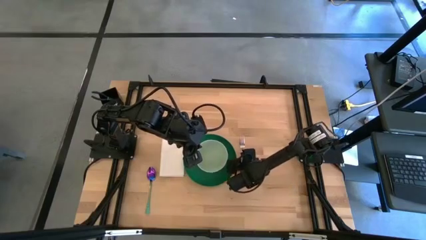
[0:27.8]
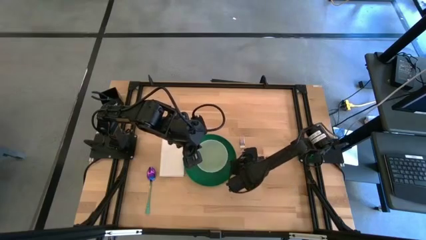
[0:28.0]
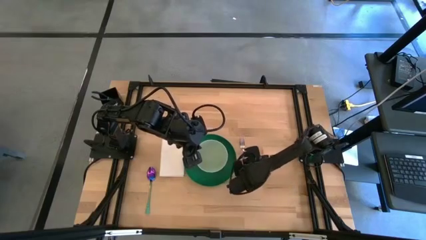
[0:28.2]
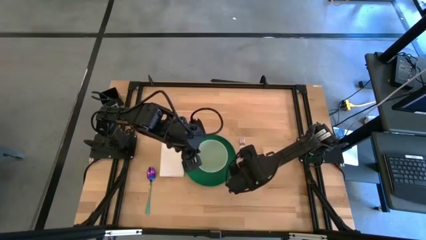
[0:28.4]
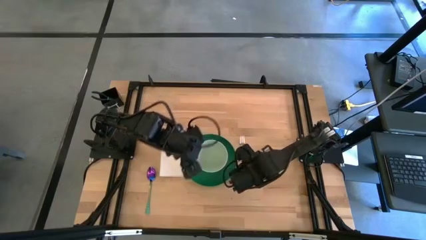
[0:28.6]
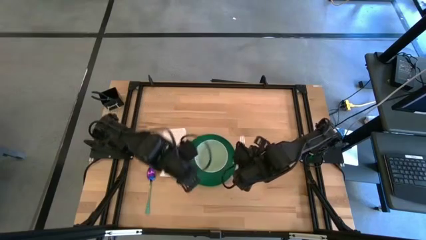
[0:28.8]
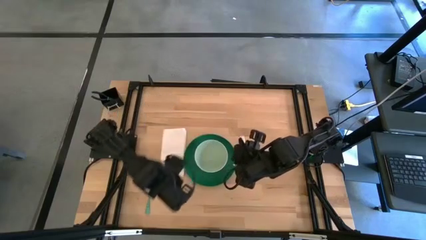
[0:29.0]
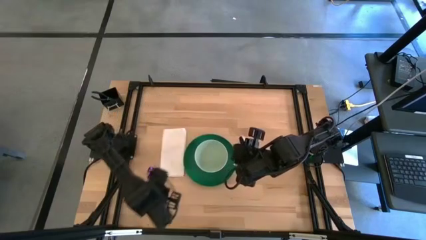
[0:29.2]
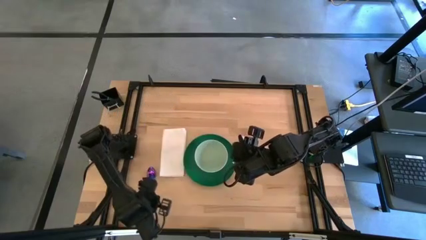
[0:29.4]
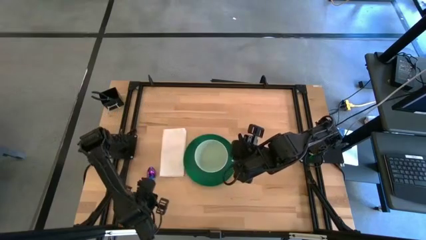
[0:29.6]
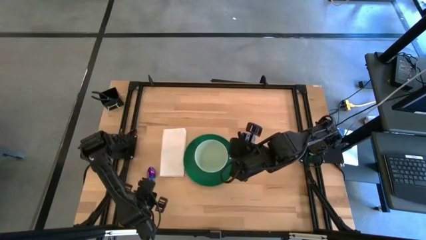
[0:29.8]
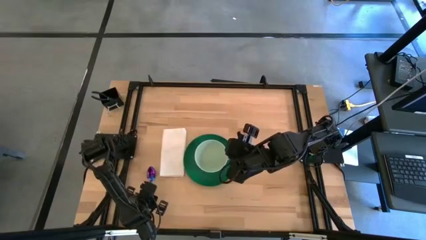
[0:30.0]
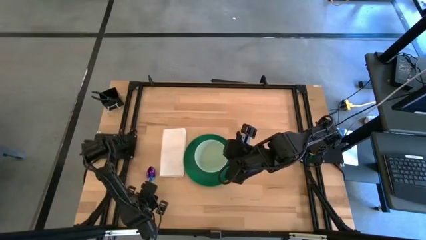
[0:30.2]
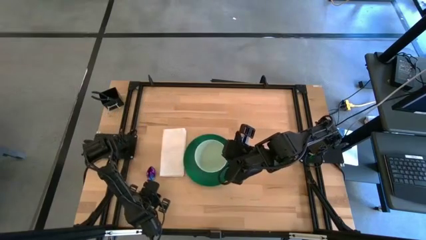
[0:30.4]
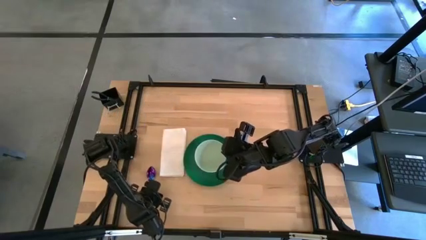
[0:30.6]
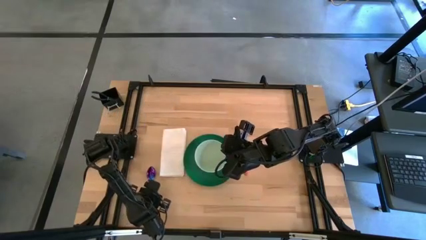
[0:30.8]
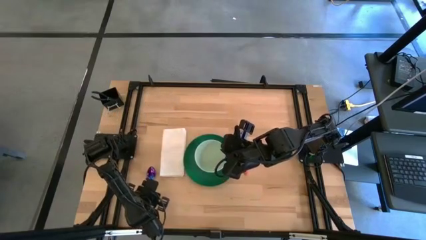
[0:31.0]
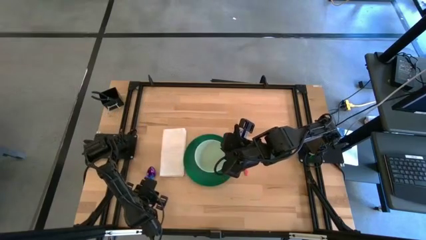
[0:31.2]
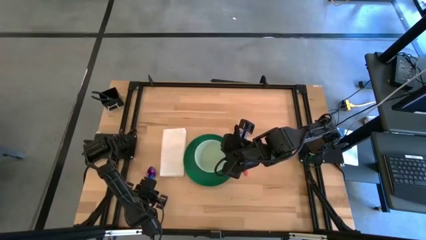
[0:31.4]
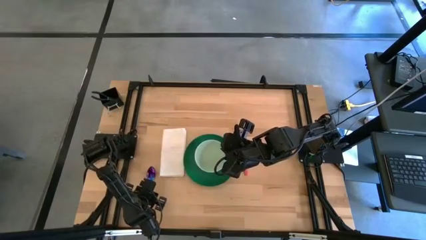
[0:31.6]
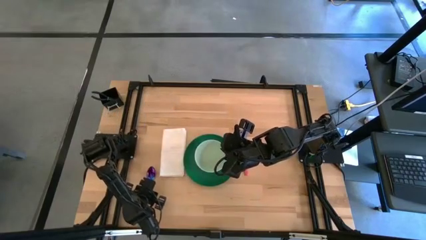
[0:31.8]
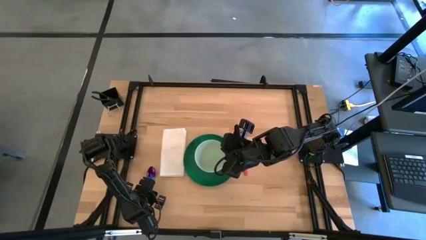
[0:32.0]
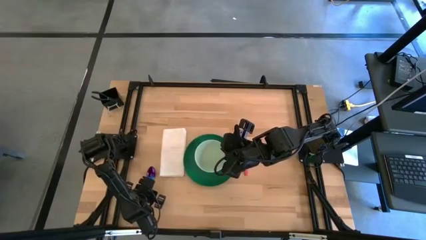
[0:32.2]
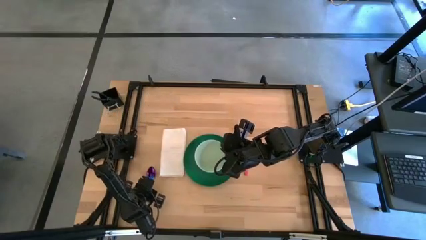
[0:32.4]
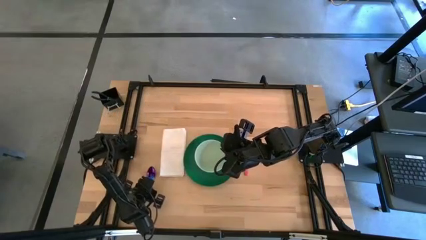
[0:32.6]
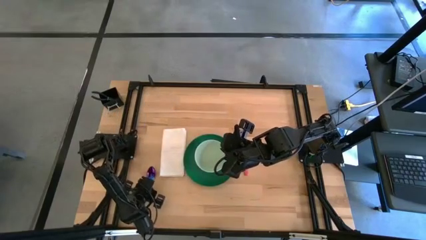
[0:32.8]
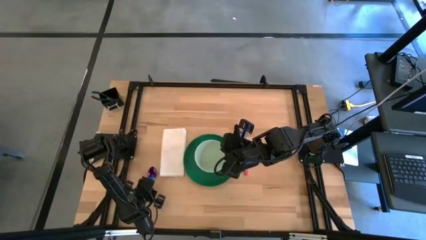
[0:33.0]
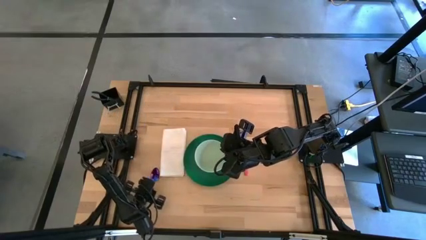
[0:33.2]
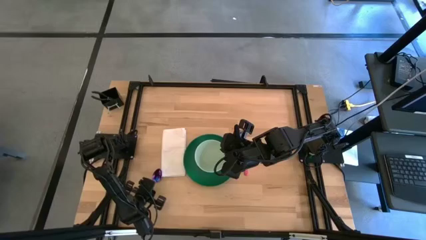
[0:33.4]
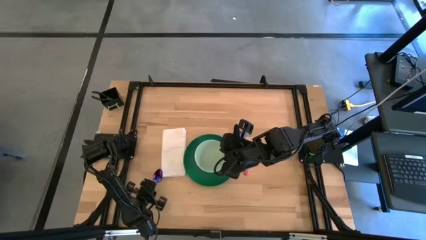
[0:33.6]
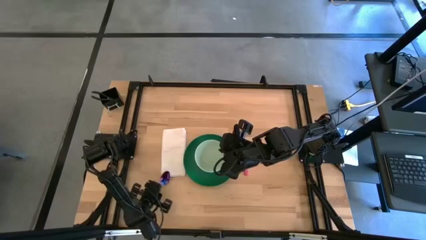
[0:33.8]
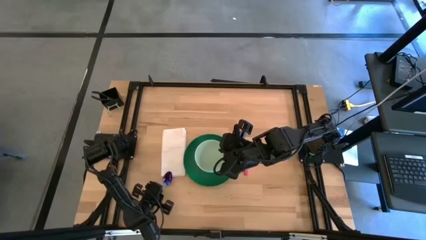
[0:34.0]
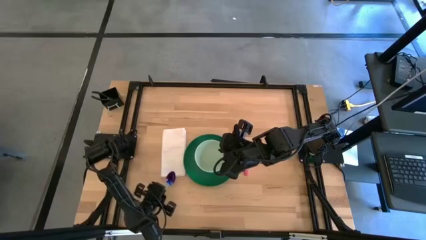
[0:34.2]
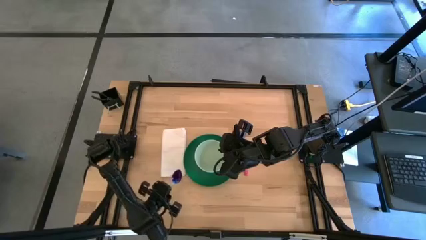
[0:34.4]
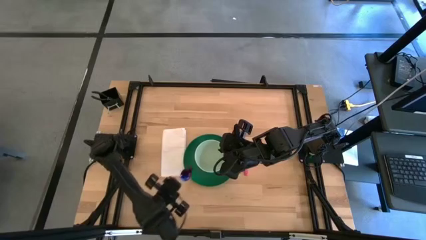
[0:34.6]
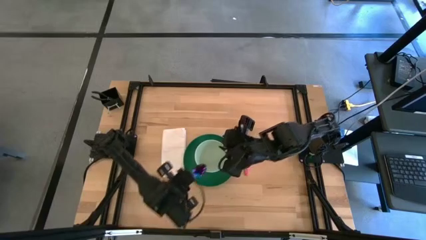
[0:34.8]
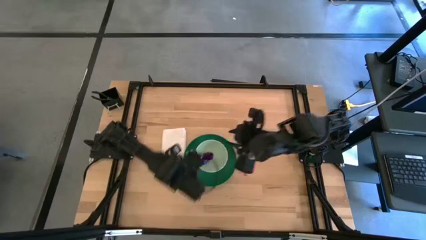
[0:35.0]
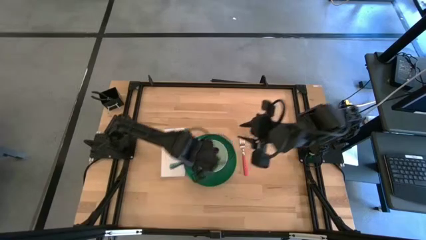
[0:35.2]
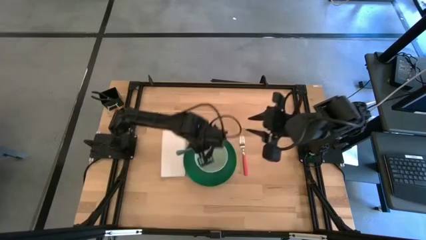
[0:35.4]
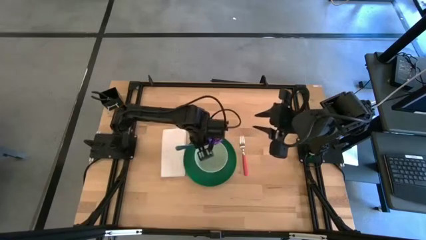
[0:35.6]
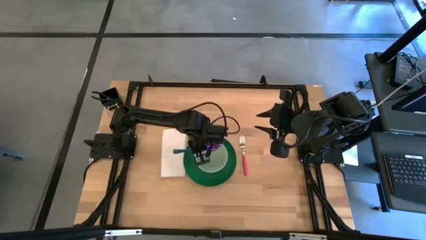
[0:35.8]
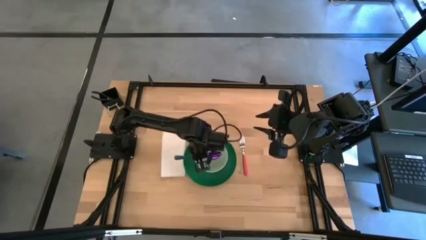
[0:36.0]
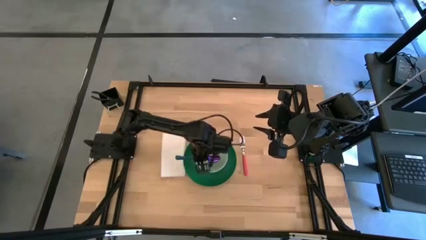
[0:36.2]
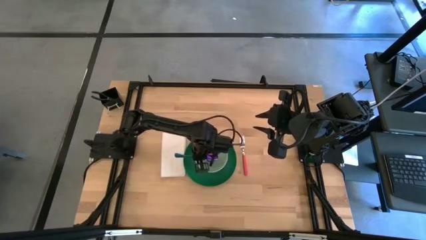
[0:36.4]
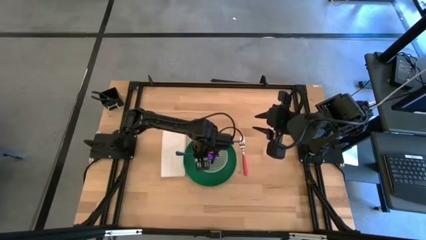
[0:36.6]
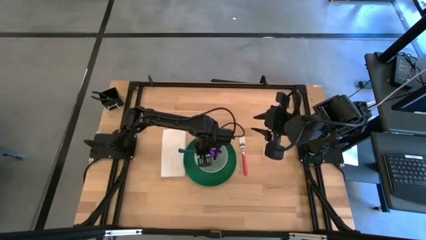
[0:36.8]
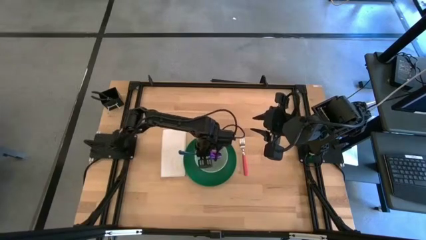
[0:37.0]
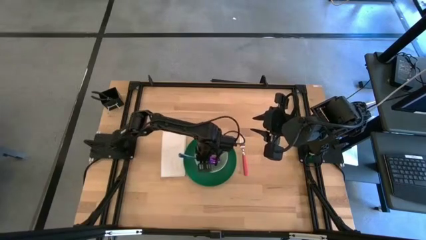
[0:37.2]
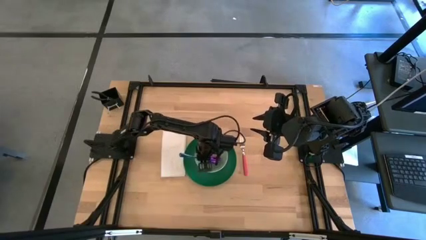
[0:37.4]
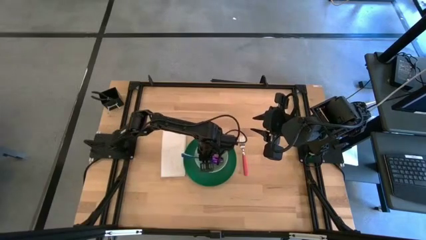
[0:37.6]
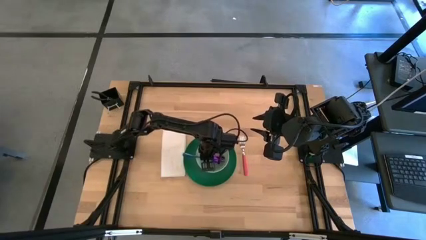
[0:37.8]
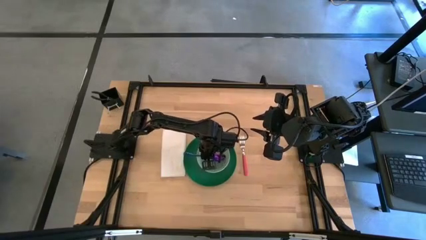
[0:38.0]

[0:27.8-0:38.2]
Task: Set table place
Put the blue spoon into the blue bowl

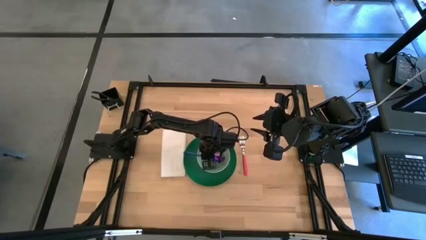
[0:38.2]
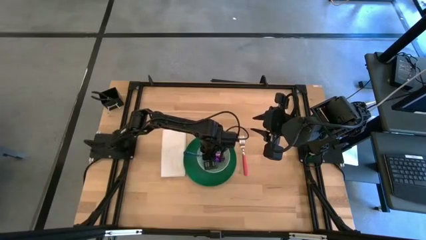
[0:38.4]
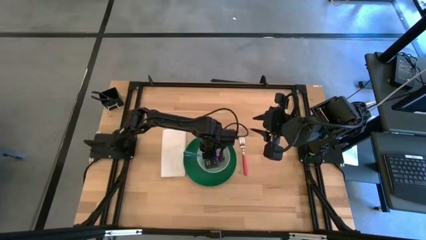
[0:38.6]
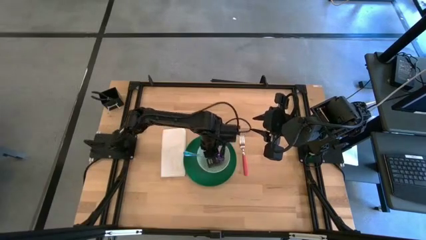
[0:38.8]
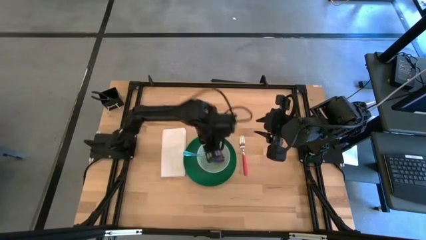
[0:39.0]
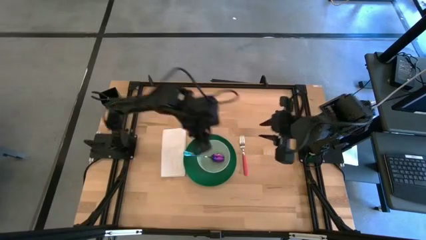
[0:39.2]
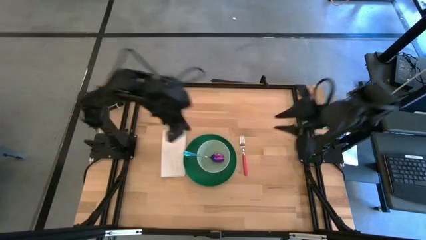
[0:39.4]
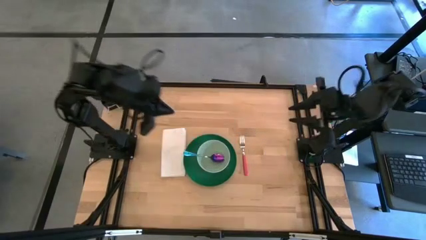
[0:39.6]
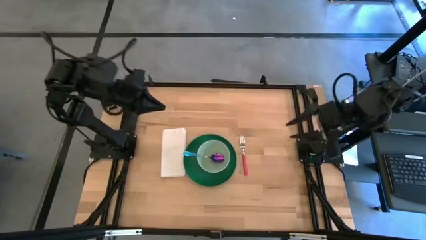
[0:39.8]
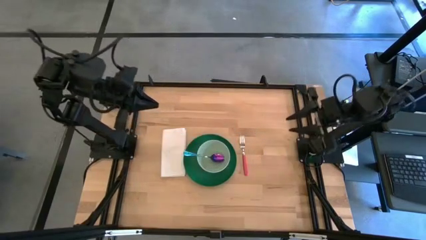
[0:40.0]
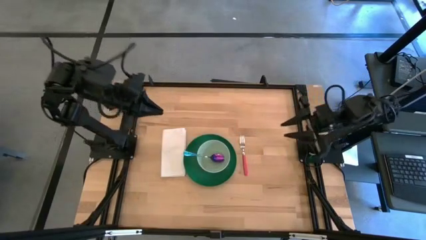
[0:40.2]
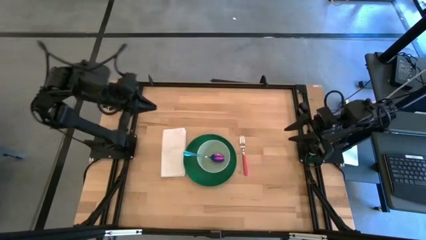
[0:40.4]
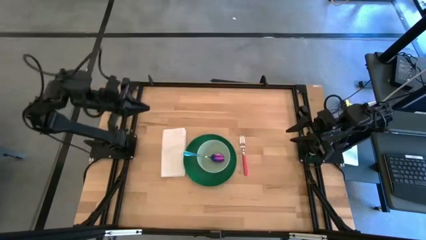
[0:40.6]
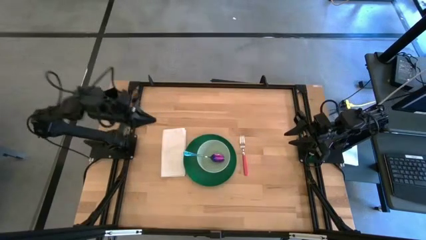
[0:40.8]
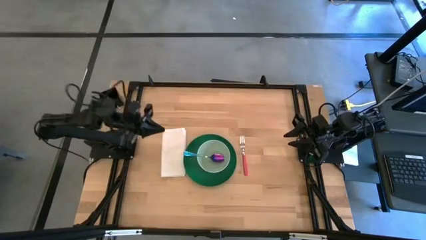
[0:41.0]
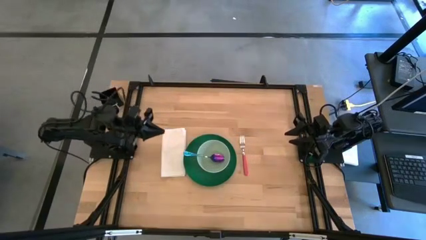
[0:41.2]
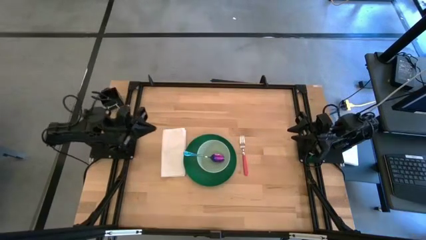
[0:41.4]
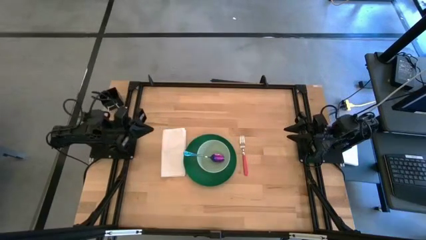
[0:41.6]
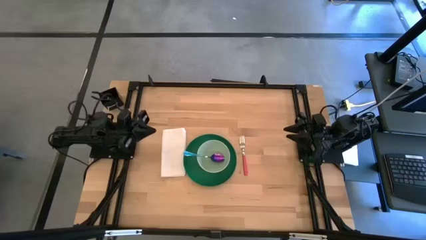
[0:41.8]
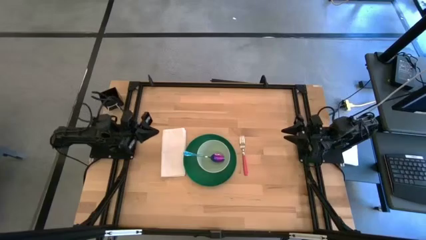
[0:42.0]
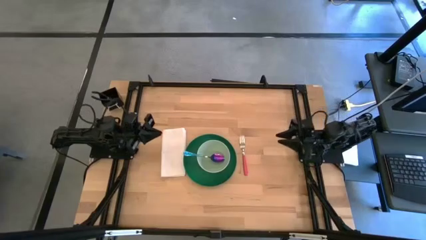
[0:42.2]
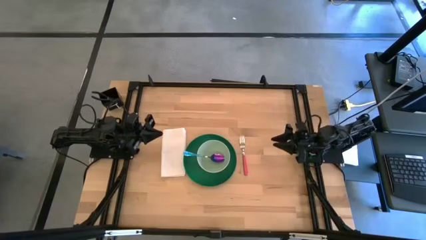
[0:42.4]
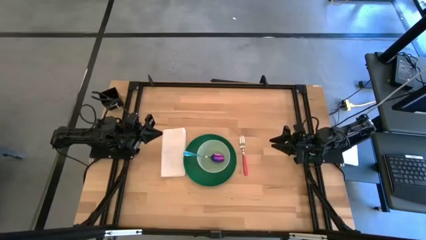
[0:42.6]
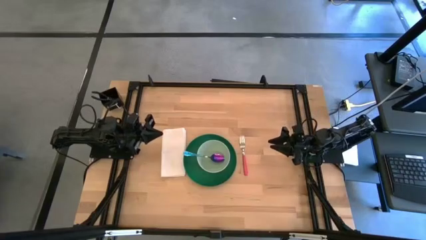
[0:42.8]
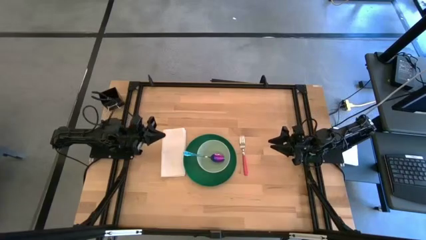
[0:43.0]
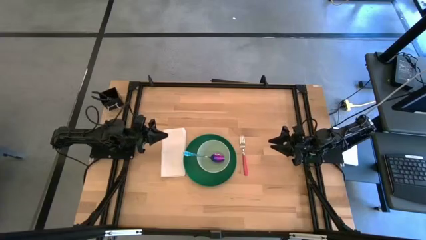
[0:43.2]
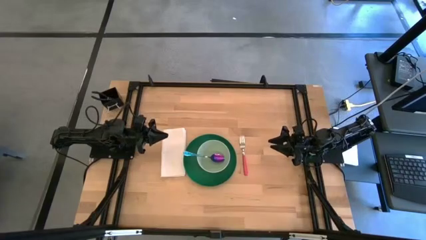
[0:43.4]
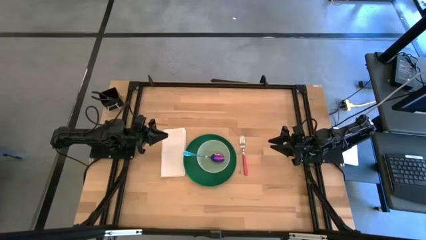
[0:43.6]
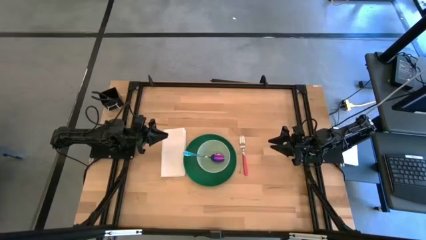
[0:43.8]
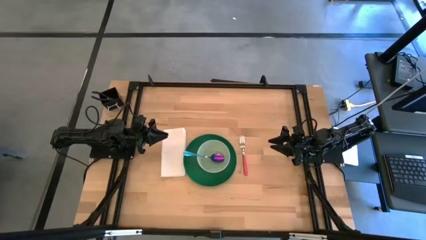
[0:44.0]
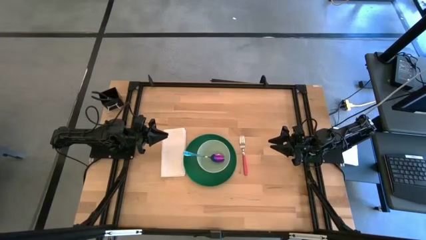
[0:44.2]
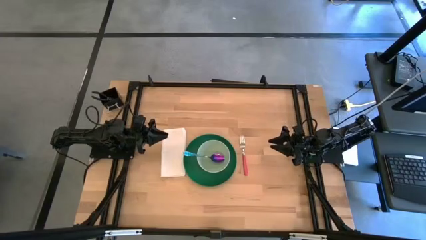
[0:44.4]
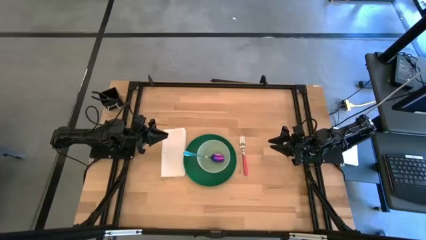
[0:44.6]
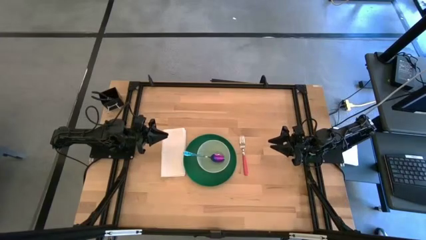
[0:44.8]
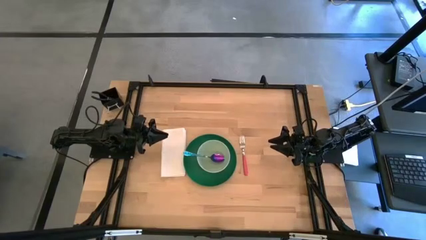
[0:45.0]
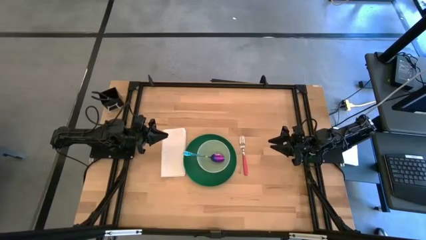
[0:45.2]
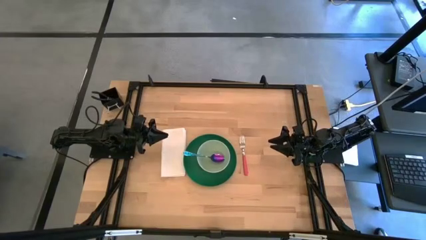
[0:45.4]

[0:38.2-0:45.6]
Return to Home Position
